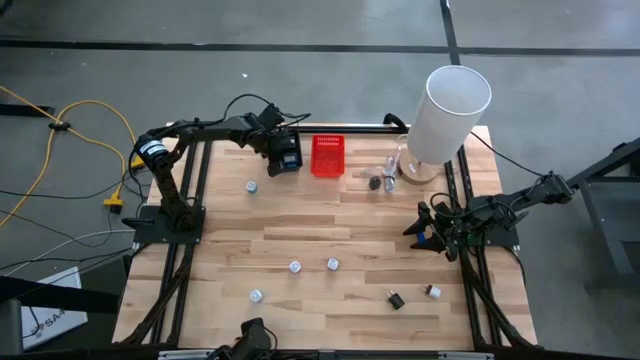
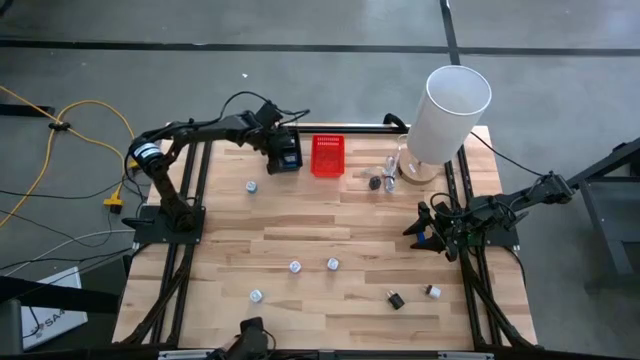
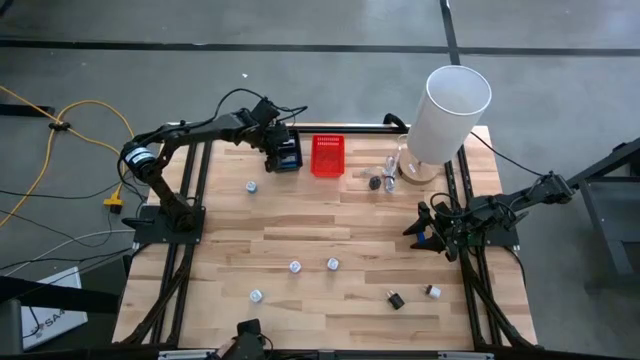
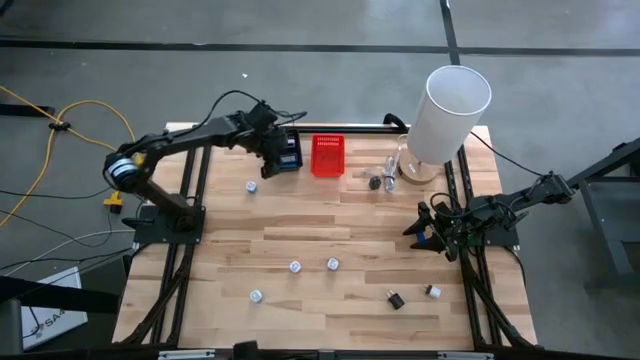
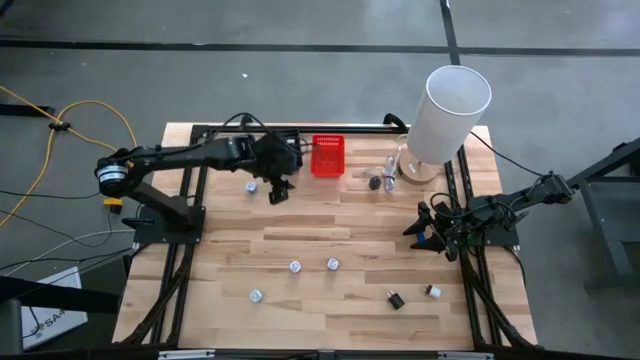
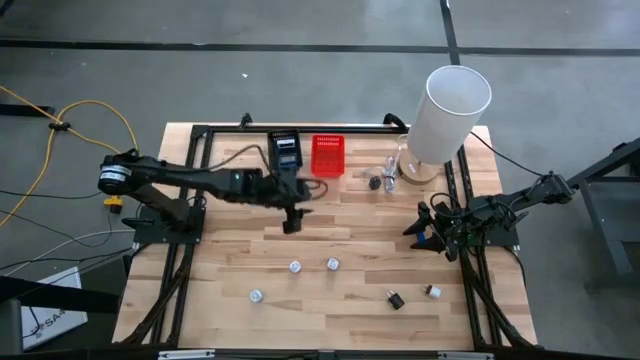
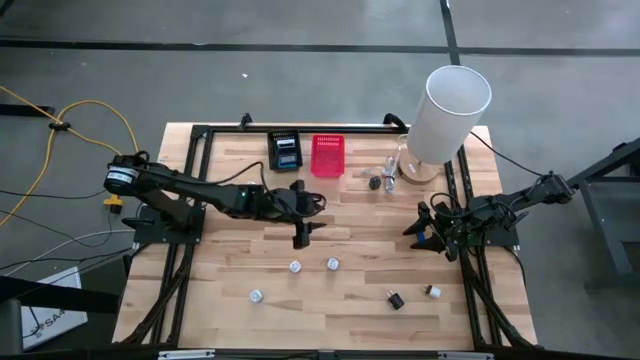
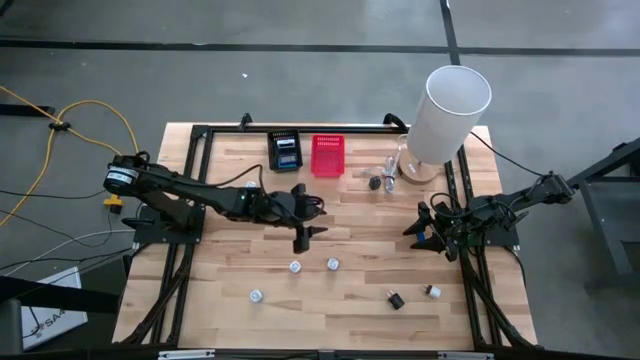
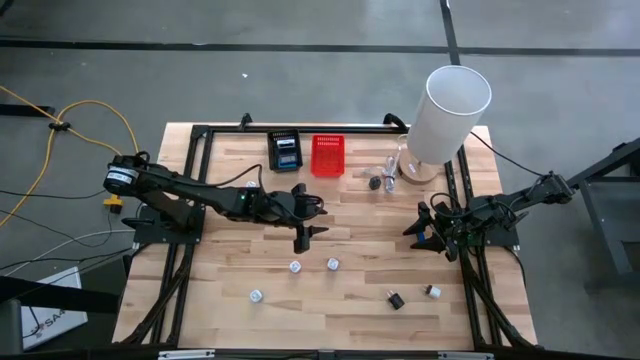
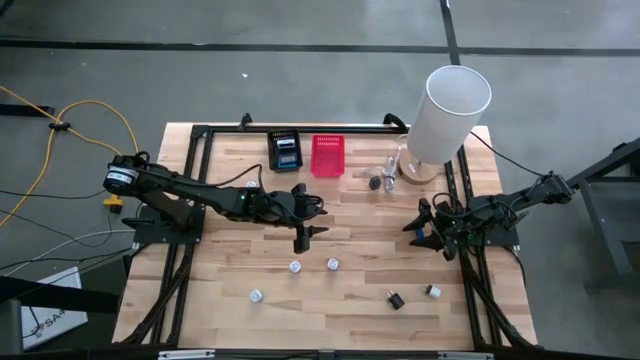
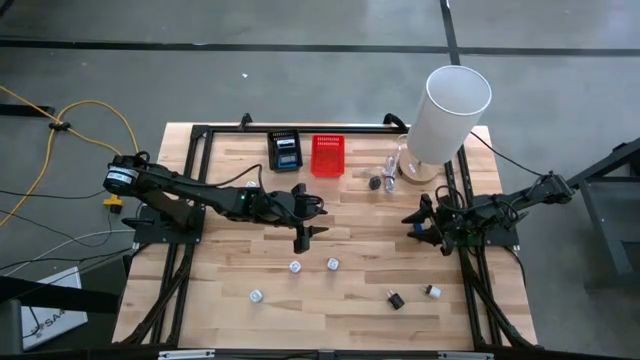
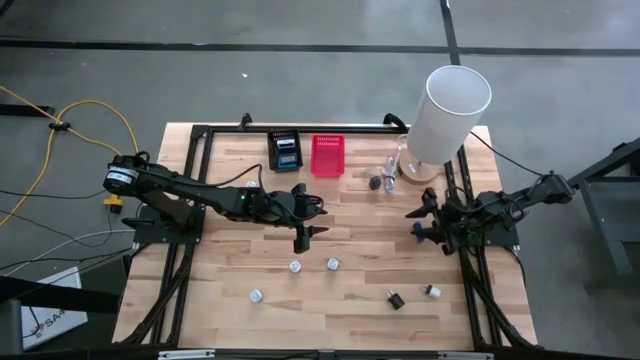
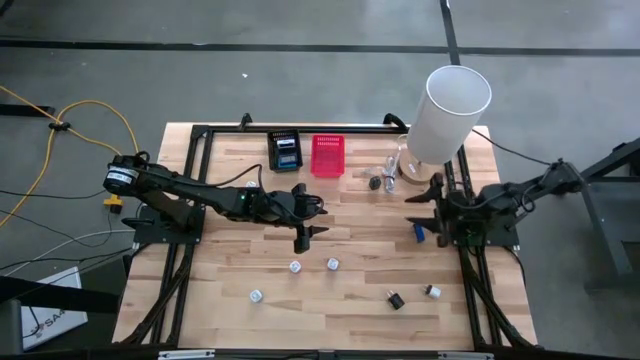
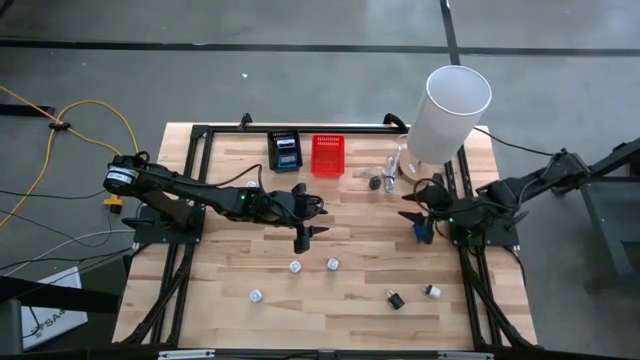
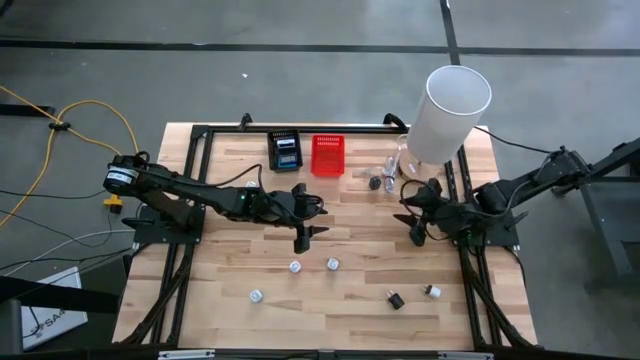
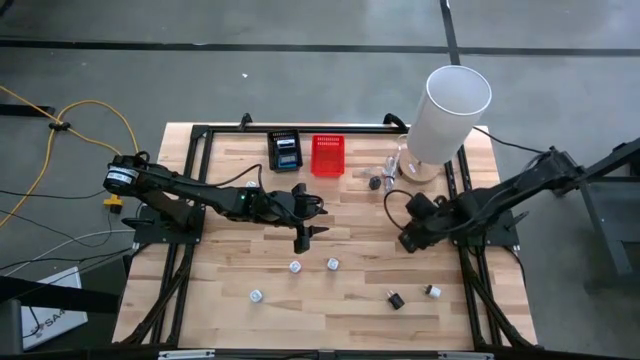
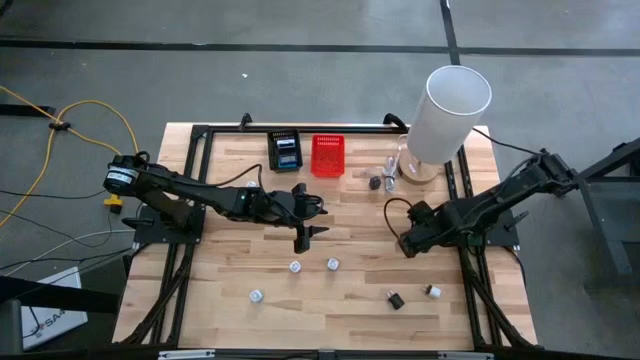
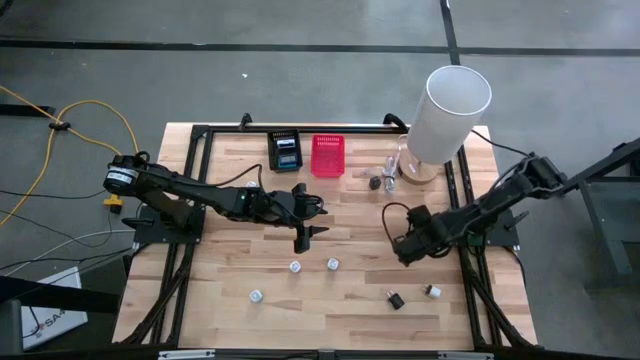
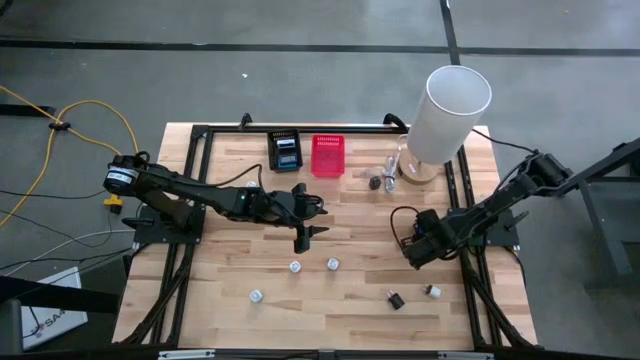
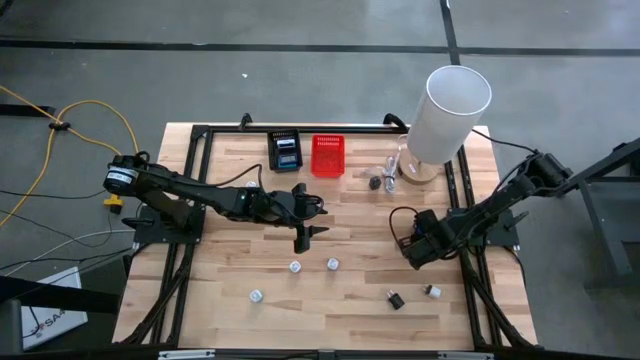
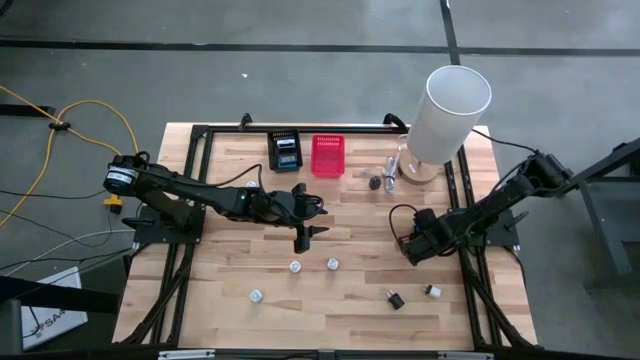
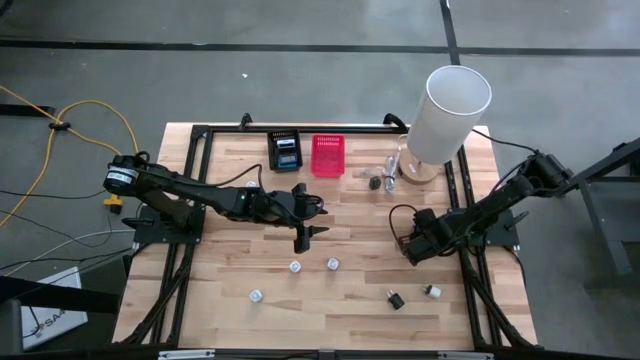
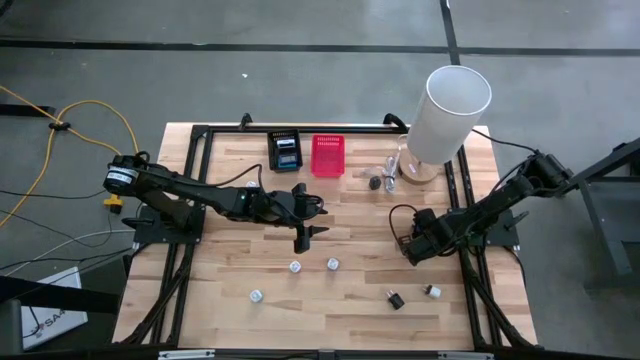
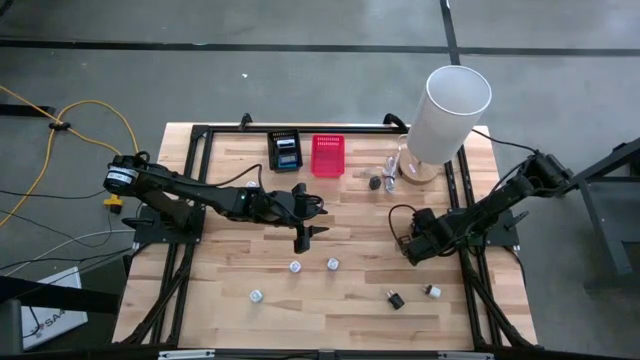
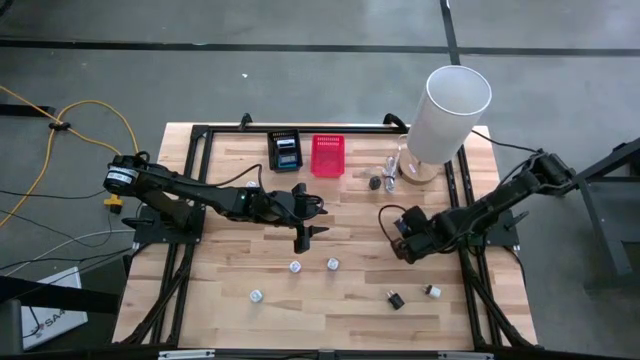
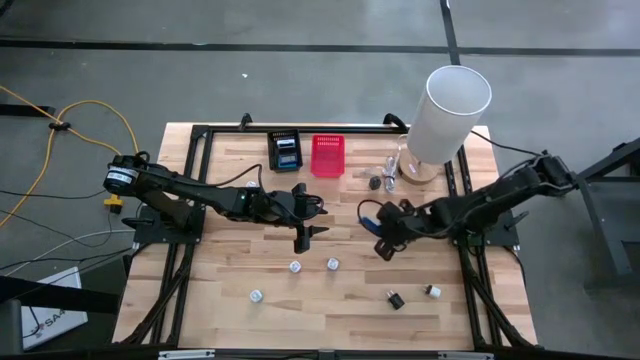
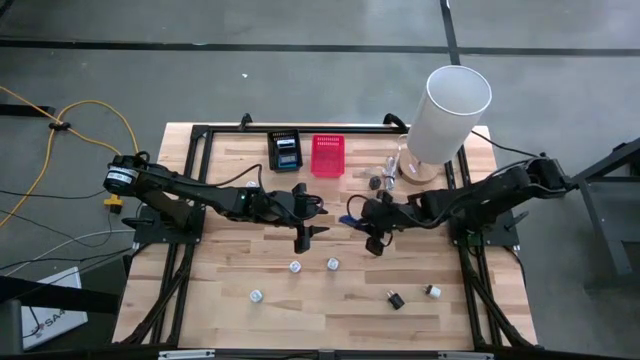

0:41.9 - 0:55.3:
Task: Pick & Place Office items
Put the blue digital timer into the black basket
